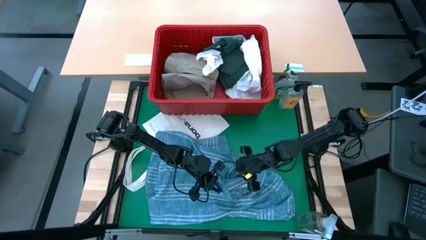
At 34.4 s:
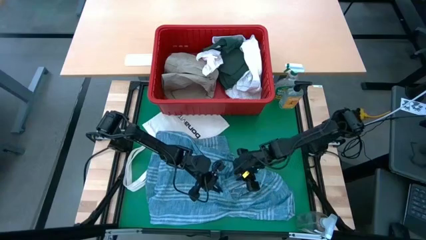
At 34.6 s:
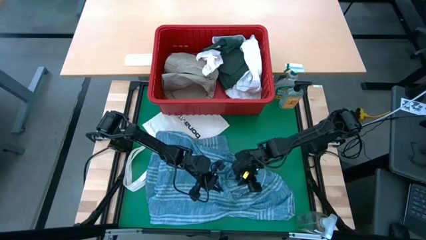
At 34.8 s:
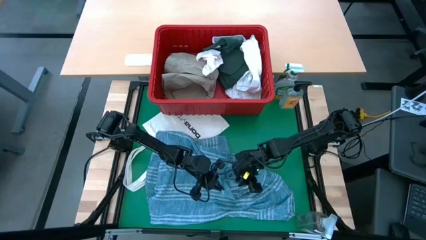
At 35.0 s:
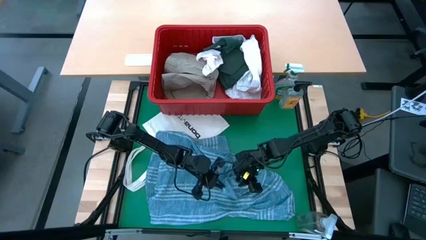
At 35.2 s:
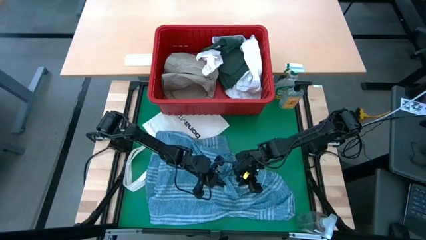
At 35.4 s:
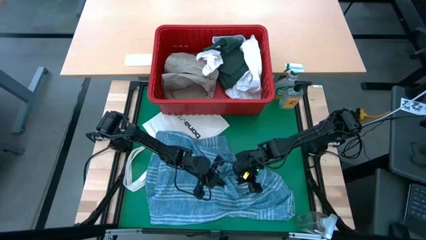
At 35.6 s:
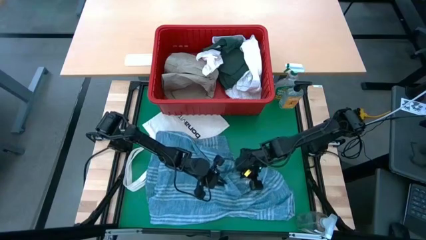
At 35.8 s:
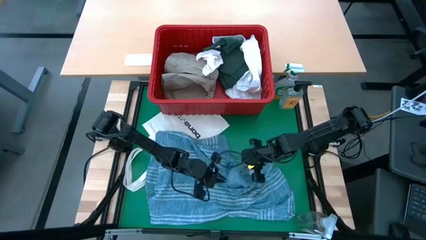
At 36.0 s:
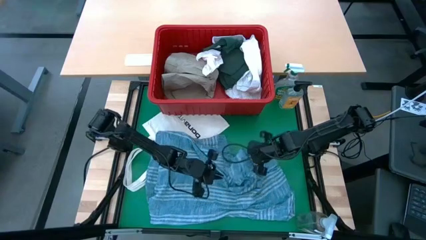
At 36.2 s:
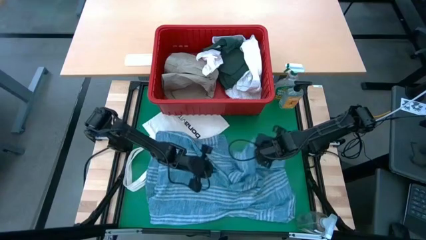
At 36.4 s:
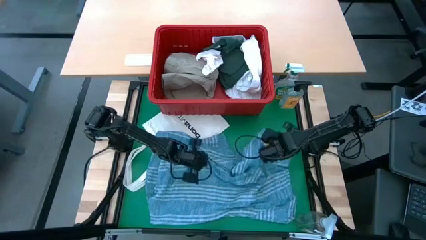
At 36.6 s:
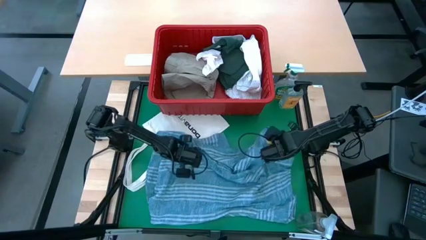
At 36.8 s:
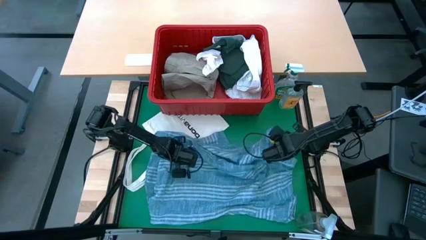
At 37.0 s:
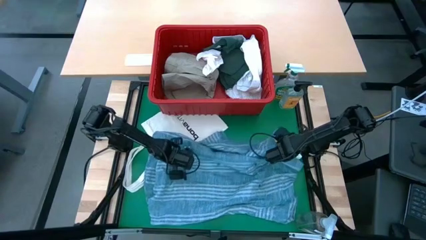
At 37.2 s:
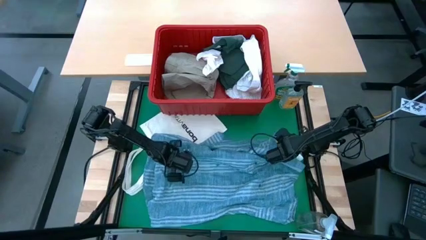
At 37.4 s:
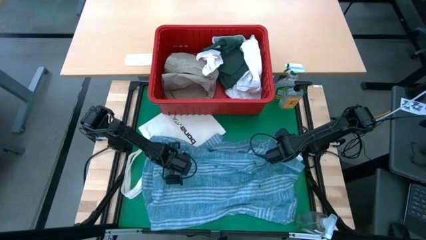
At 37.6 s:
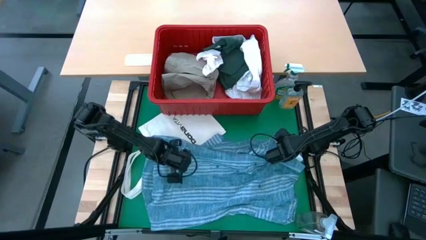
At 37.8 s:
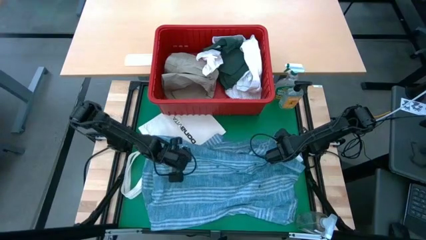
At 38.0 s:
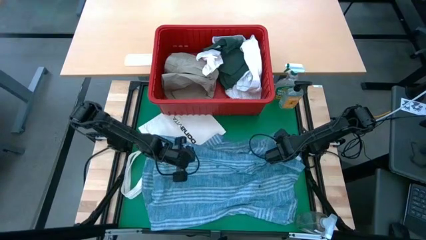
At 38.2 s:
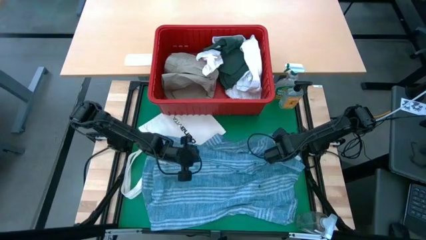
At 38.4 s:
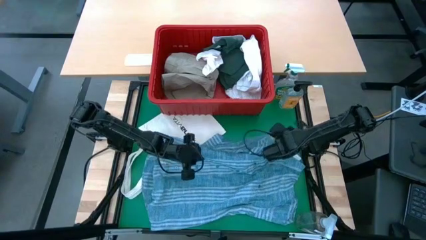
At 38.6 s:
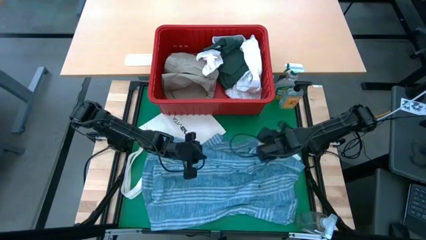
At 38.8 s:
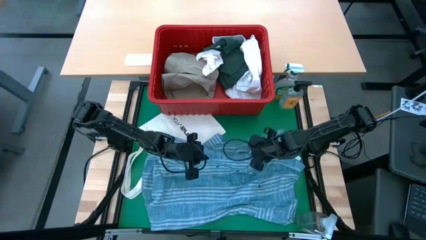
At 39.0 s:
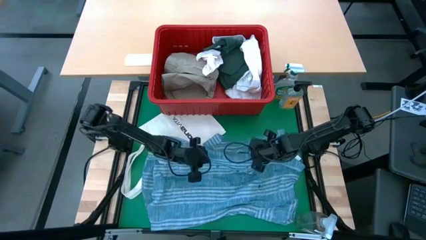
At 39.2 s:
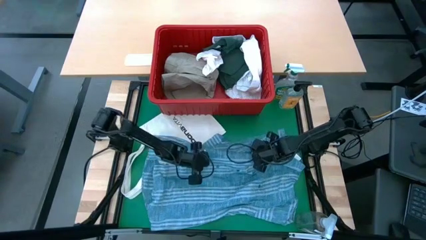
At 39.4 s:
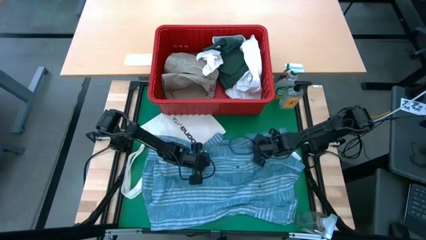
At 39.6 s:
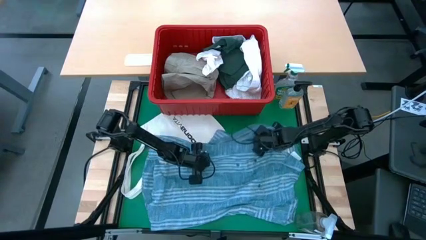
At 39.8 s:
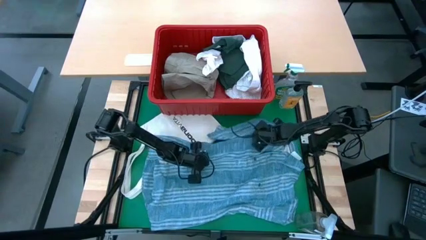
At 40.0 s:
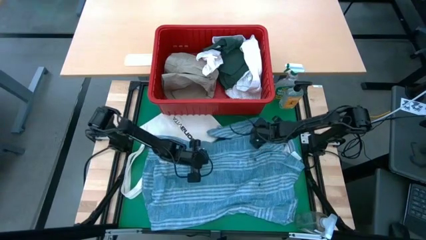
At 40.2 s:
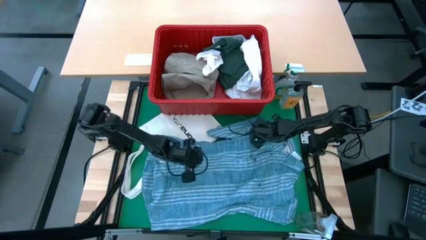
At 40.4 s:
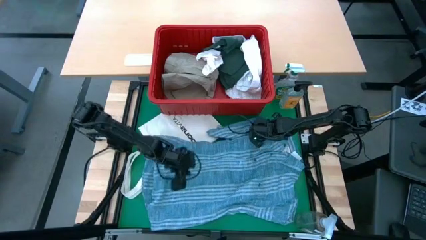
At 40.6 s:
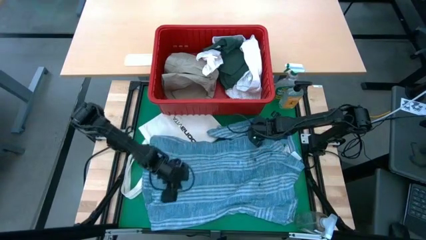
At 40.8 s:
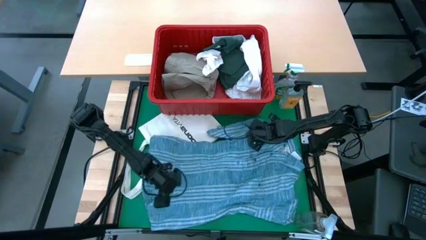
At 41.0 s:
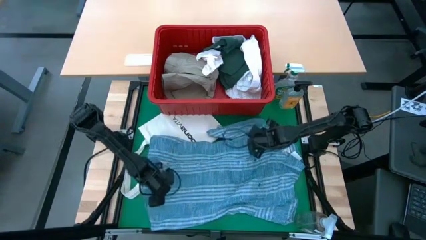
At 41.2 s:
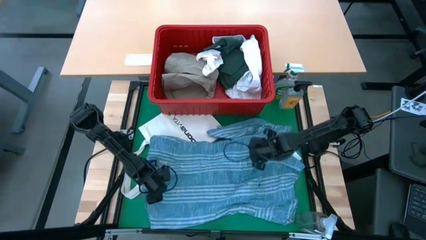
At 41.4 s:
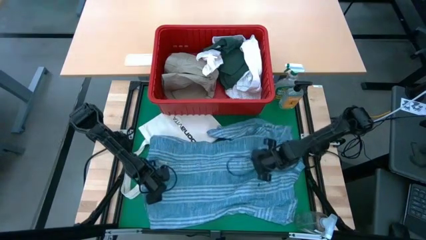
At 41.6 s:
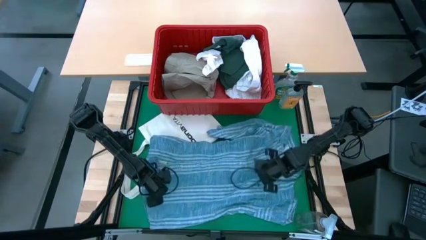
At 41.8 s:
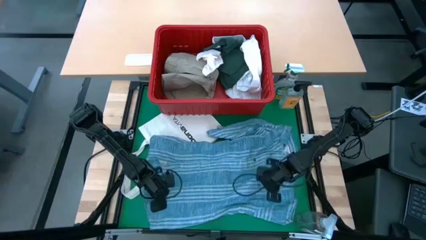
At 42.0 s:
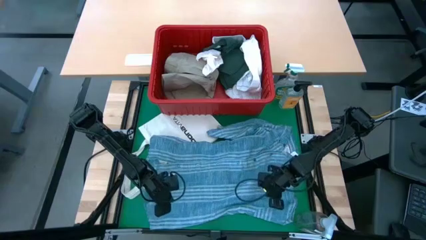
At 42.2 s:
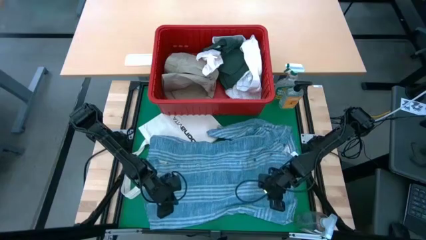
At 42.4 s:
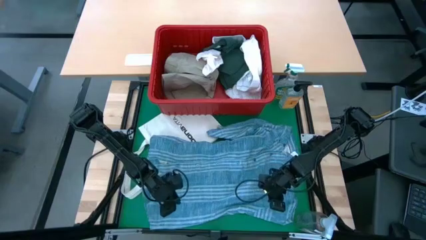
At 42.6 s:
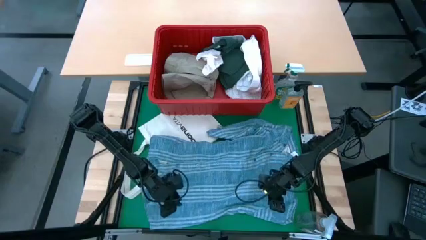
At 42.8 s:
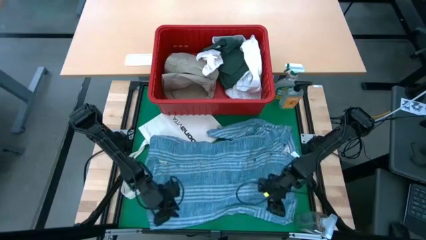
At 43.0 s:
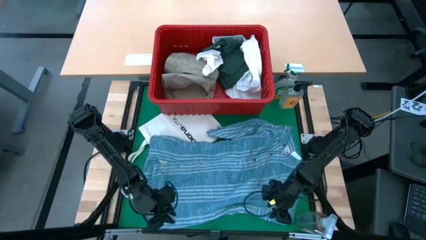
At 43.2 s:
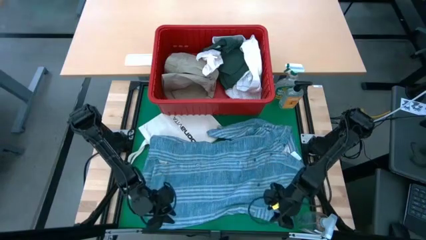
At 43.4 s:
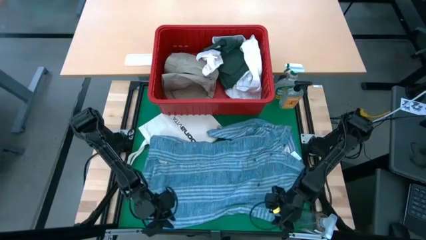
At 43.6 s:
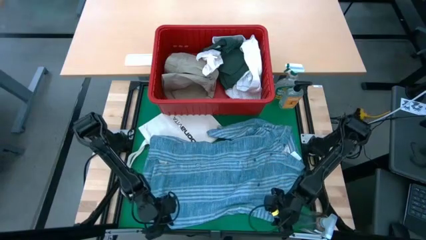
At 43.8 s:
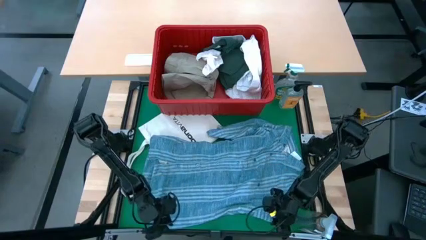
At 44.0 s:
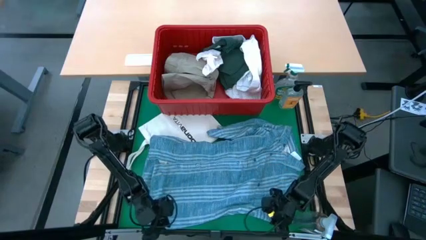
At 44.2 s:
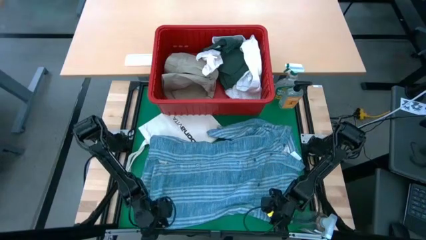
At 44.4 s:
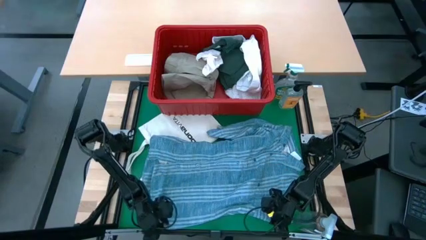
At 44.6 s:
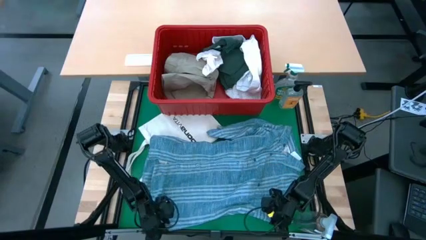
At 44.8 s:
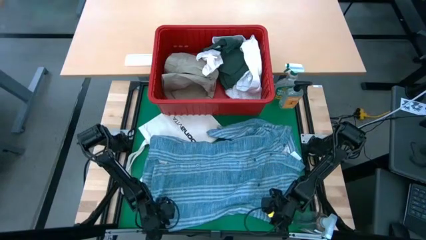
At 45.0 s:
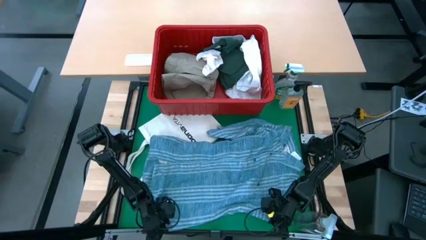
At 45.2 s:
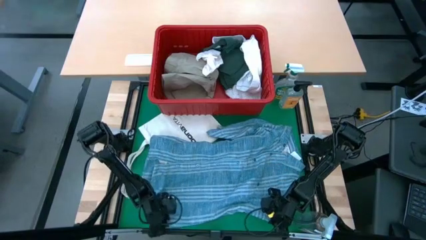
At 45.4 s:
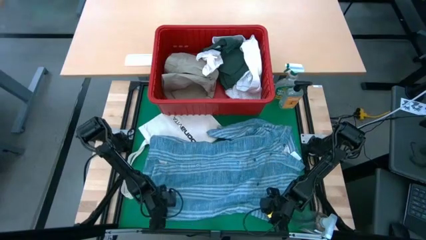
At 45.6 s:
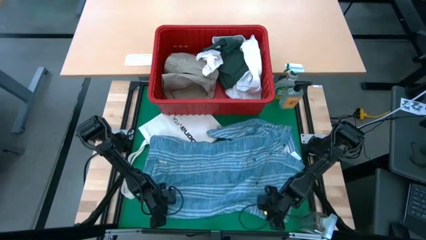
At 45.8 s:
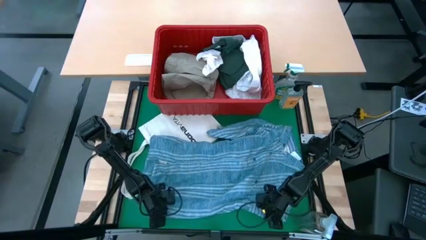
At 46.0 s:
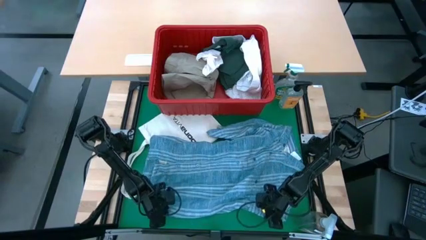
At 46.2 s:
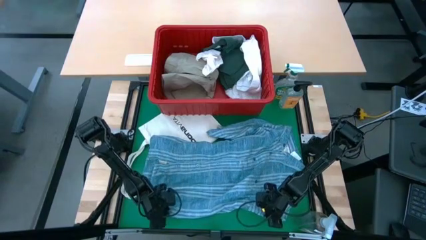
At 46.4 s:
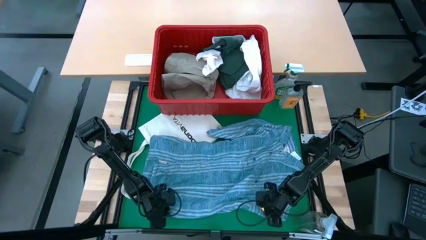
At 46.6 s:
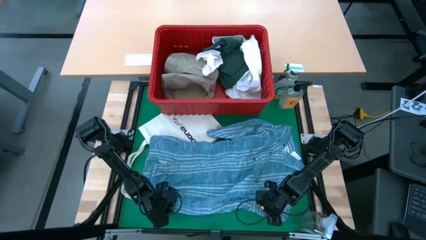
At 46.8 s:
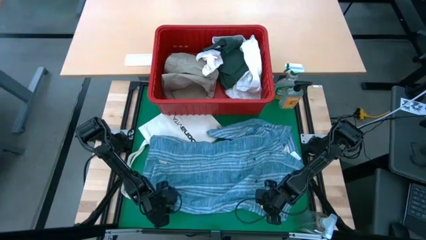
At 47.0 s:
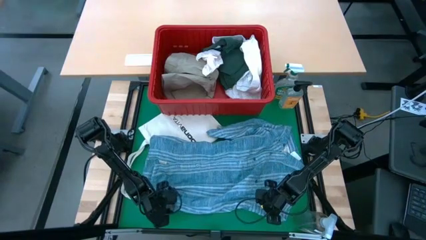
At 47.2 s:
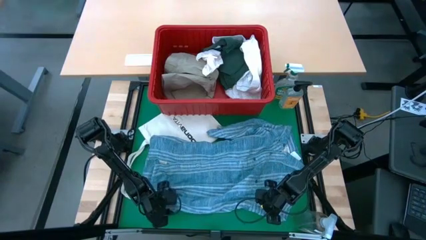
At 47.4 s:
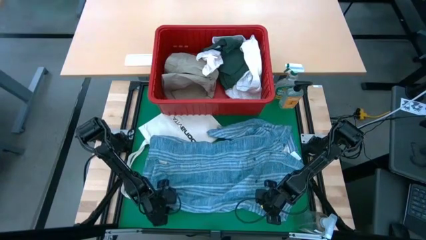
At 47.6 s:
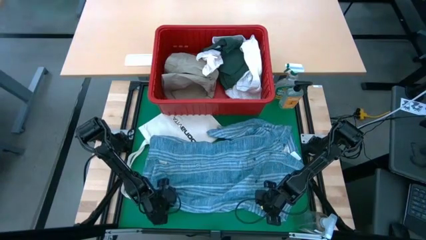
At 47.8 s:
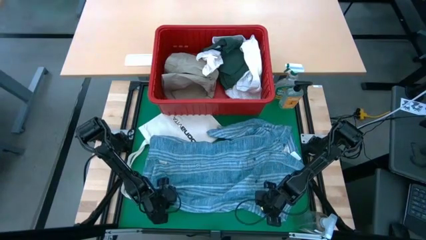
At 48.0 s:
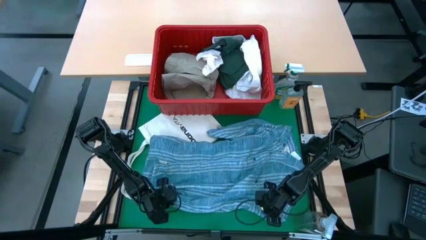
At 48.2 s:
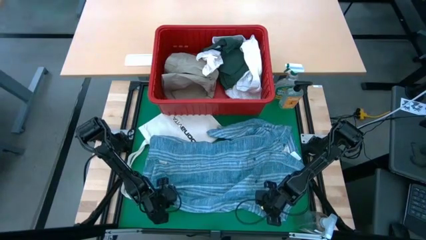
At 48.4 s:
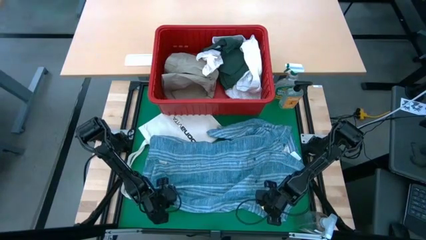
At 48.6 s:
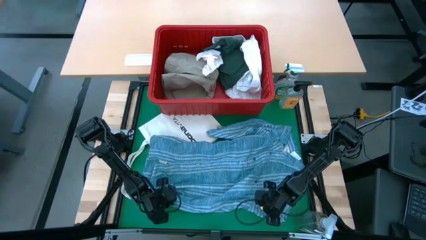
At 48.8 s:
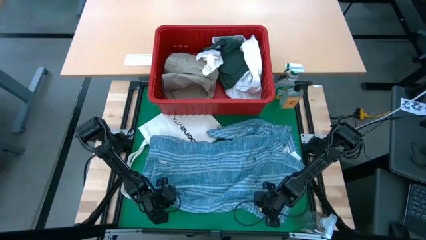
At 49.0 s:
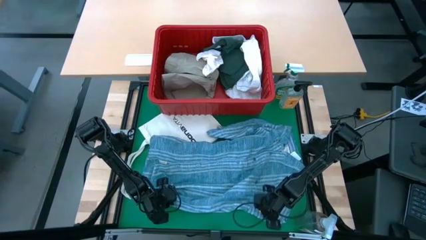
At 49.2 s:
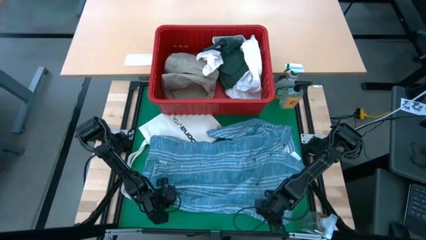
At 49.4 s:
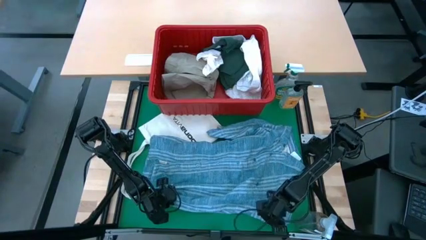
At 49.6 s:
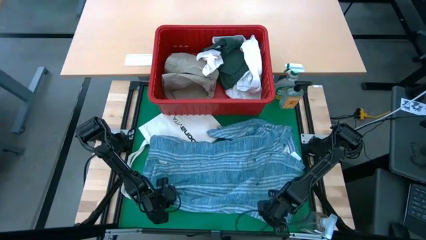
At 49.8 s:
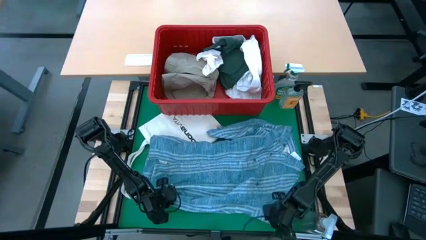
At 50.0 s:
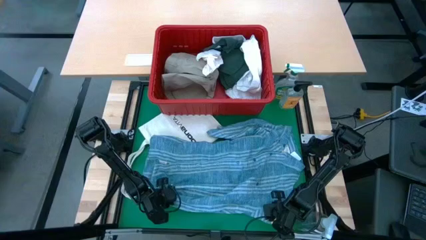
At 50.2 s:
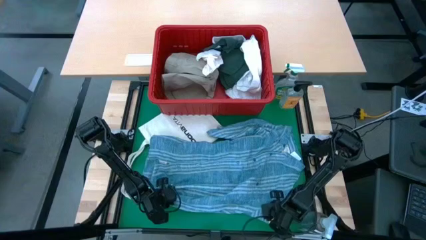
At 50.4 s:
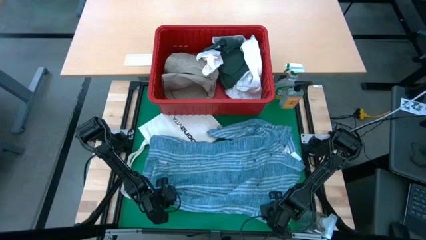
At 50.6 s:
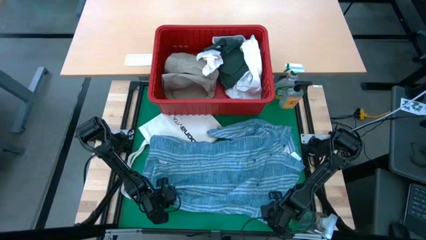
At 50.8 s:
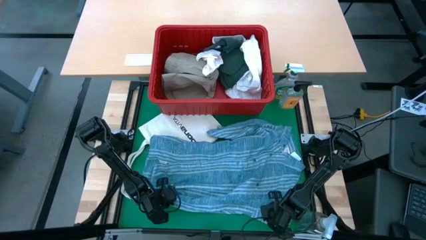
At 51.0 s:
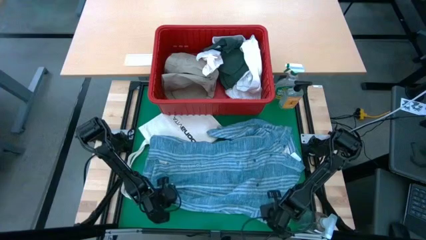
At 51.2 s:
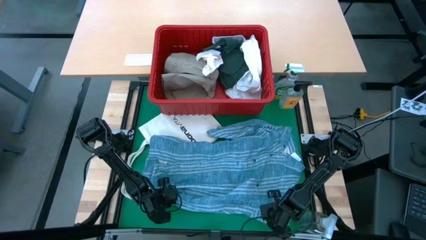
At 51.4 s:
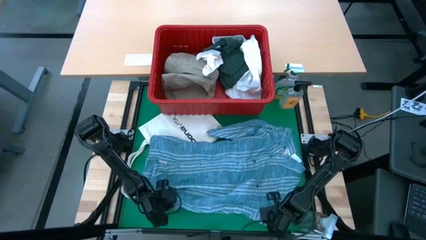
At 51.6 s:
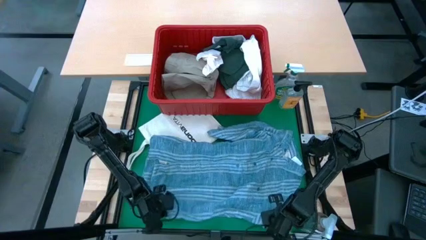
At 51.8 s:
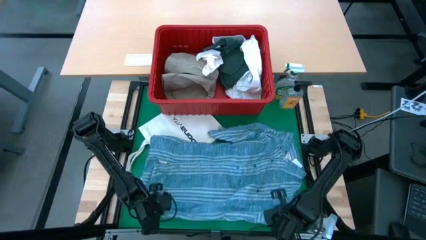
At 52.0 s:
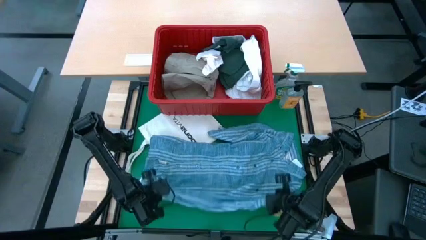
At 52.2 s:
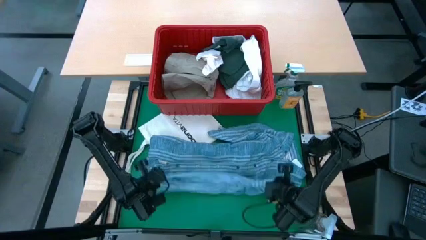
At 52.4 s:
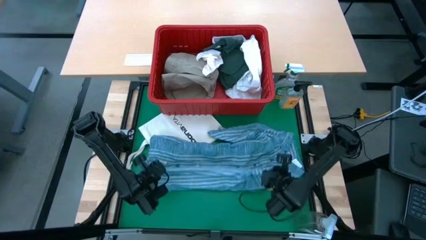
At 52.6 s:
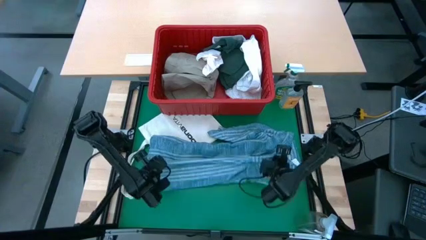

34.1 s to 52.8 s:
Task: Fold Laundry from Bin
Fold the blue polo shirt
